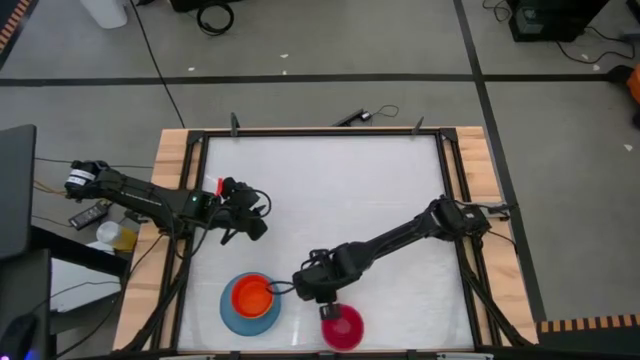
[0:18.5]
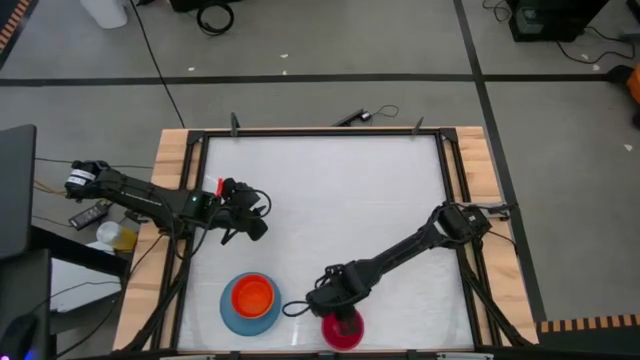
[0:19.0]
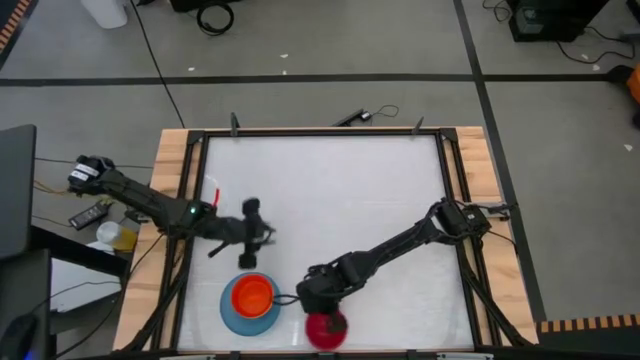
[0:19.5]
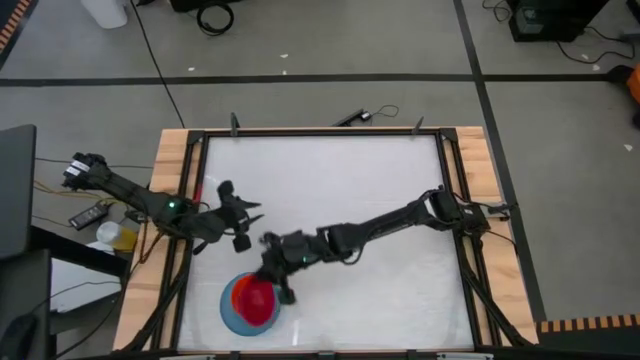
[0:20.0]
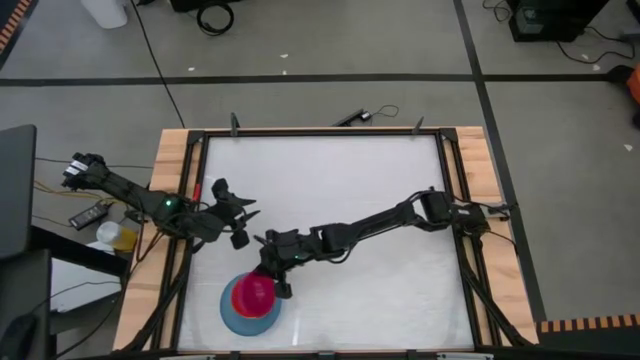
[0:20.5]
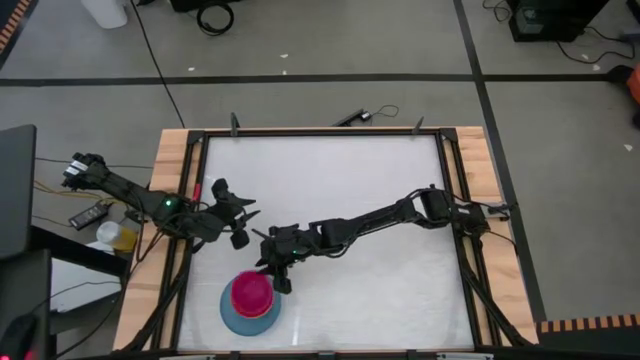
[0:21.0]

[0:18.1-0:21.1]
Stack the red bowl on top of the orange bowl

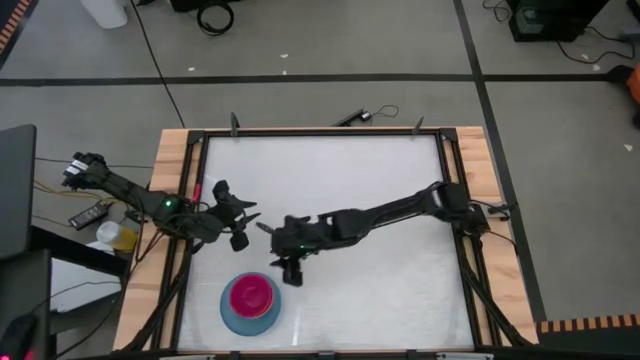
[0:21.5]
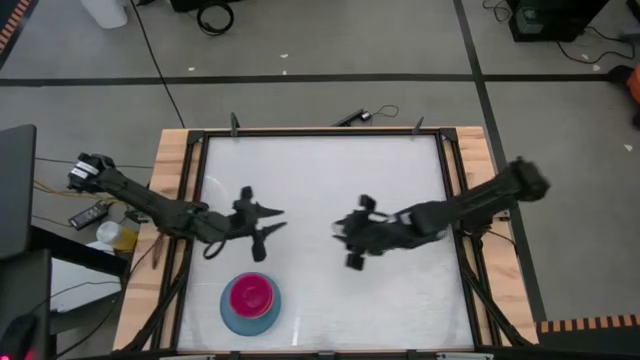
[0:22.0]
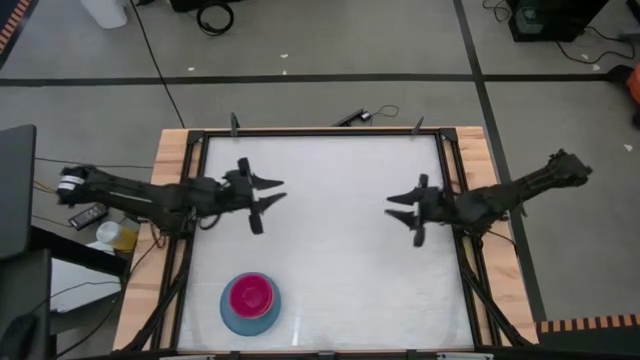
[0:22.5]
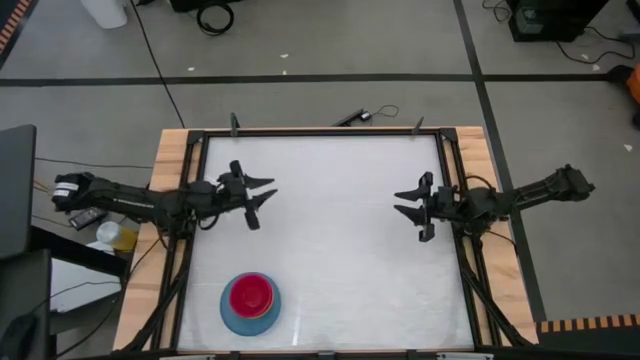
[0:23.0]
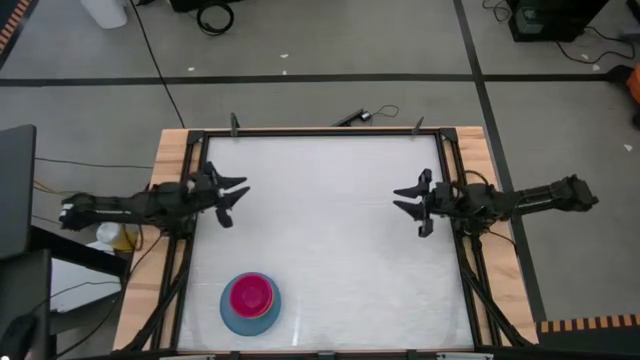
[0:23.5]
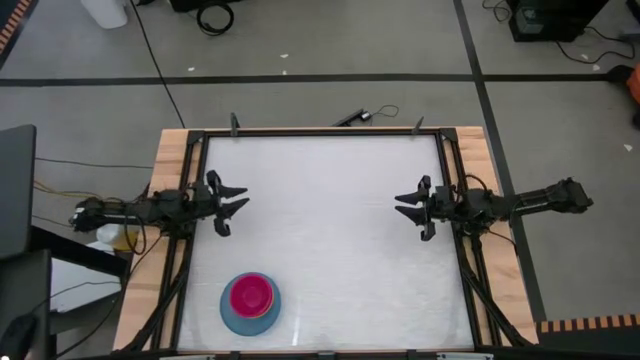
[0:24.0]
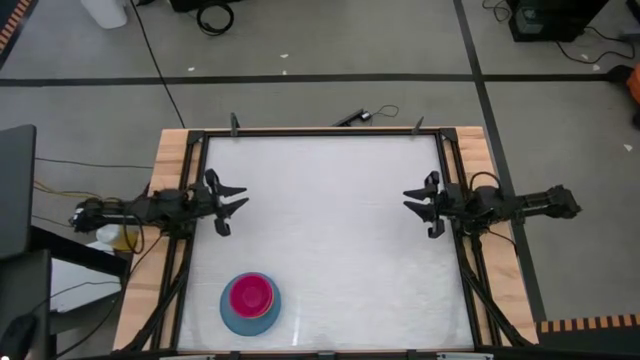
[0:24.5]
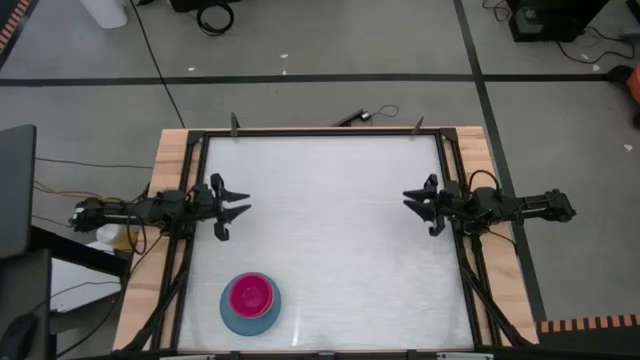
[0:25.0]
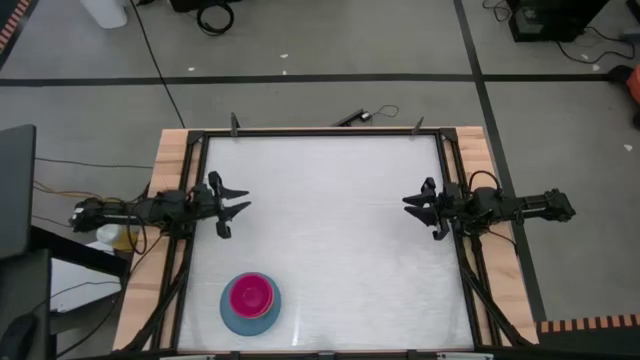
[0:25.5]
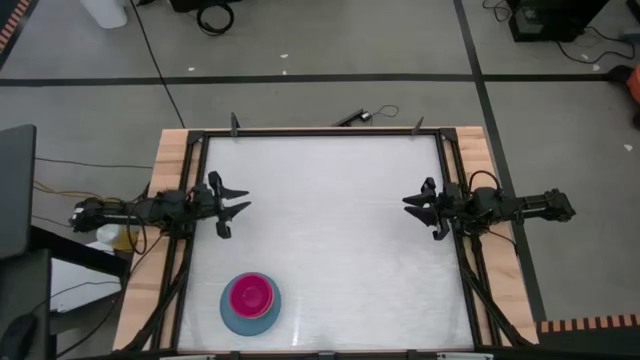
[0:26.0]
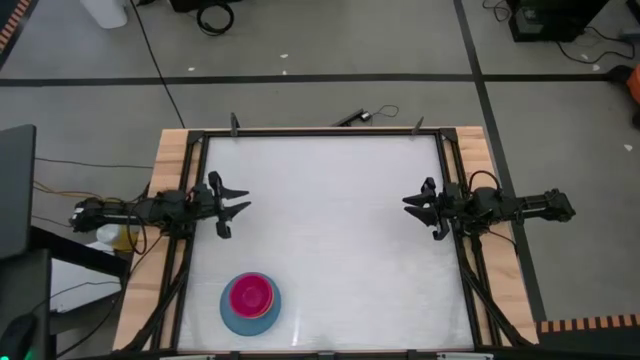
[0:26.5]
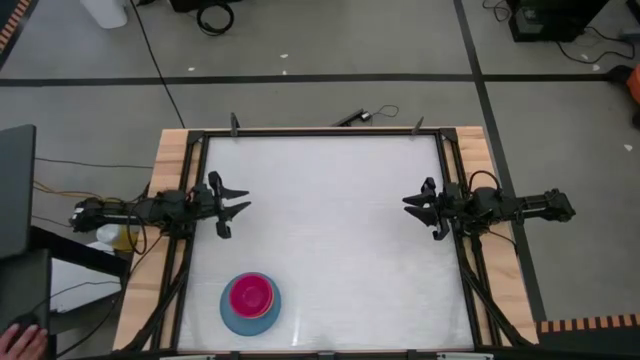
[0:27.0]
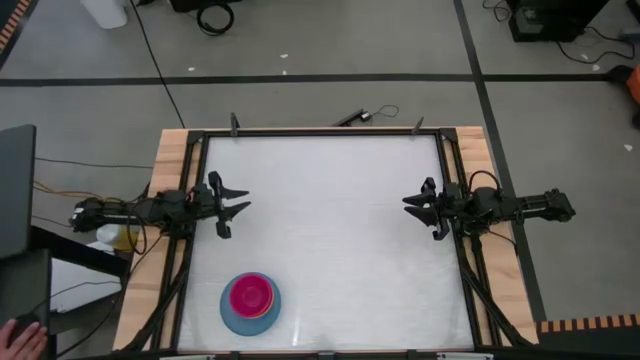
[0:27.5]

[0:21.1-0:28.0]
Return to Home position
